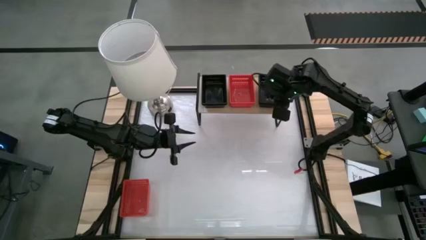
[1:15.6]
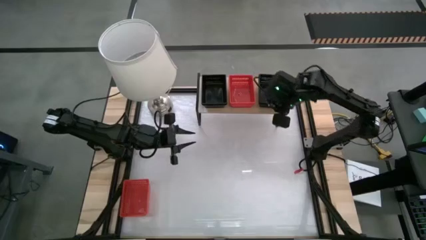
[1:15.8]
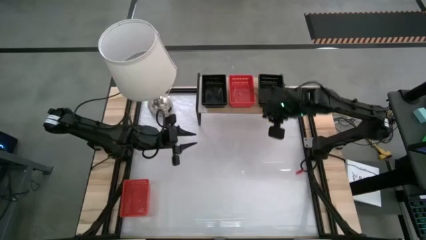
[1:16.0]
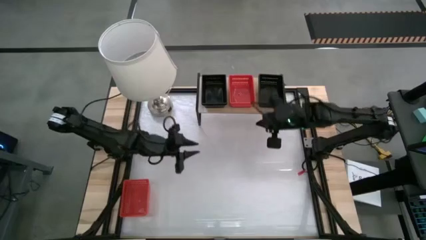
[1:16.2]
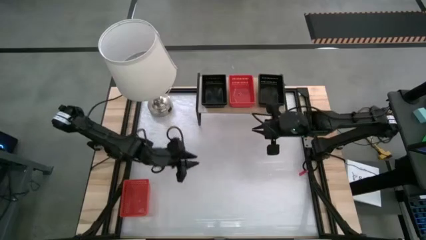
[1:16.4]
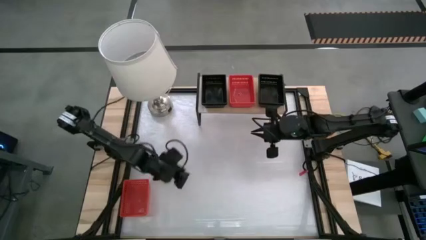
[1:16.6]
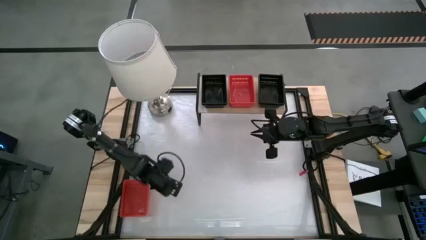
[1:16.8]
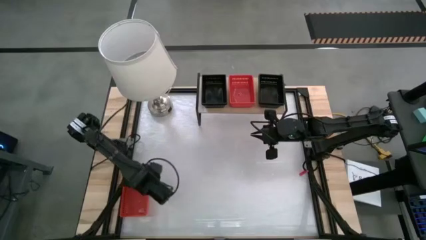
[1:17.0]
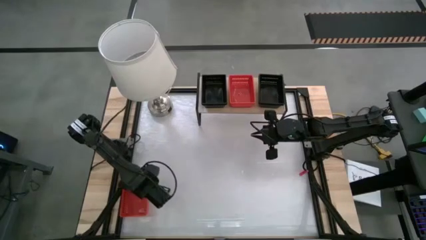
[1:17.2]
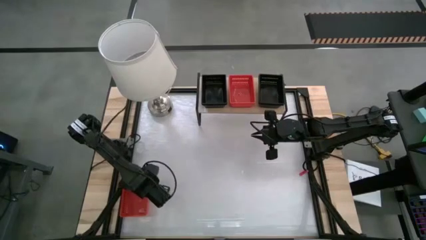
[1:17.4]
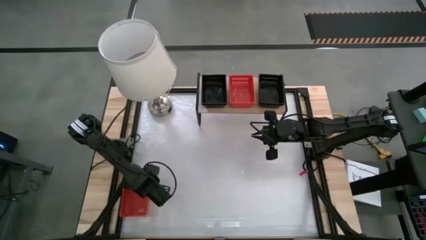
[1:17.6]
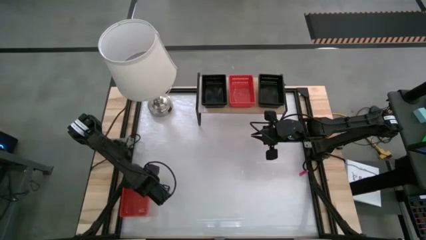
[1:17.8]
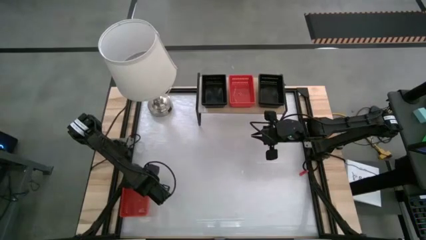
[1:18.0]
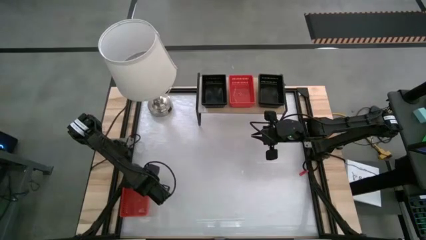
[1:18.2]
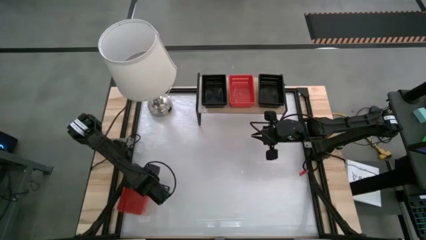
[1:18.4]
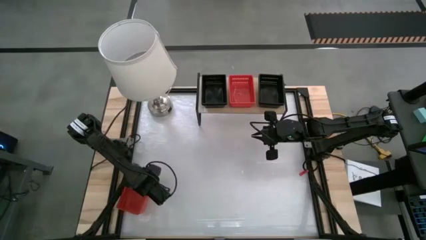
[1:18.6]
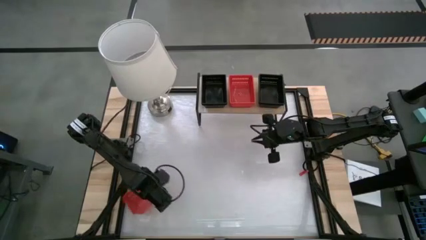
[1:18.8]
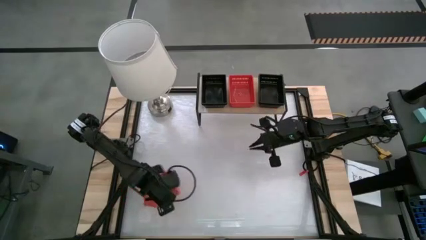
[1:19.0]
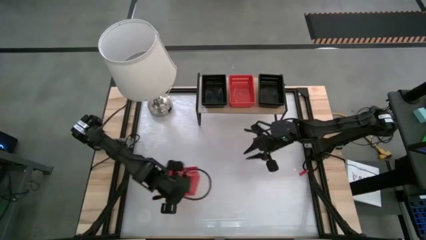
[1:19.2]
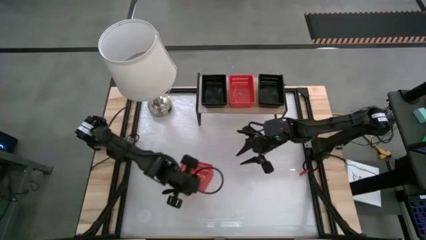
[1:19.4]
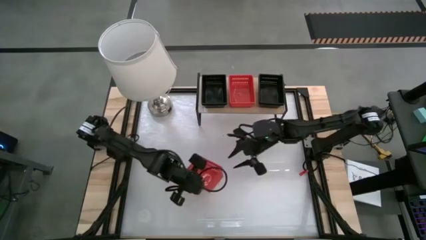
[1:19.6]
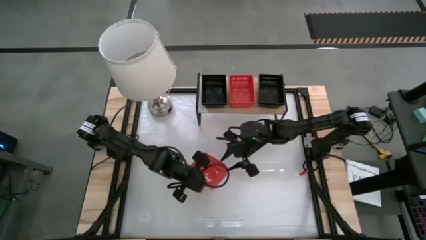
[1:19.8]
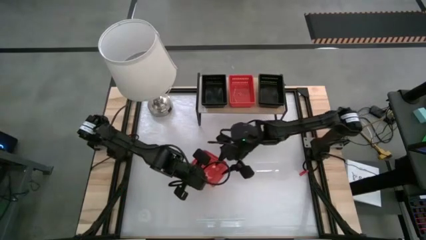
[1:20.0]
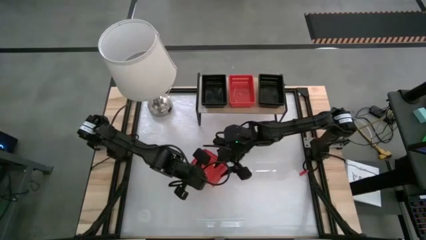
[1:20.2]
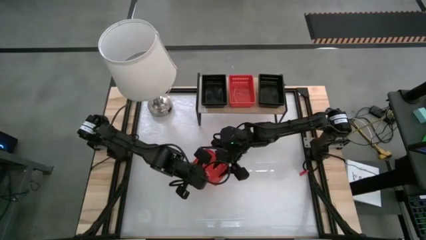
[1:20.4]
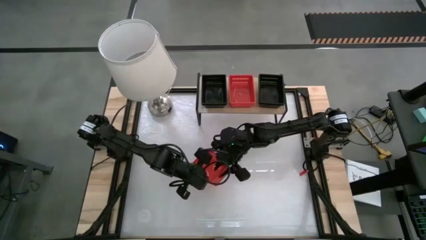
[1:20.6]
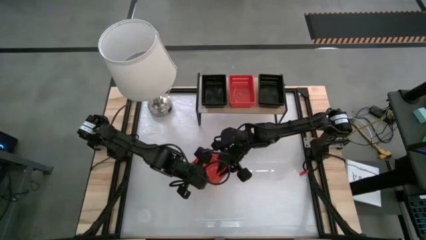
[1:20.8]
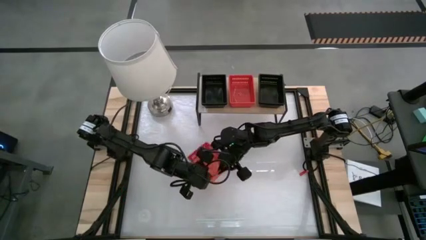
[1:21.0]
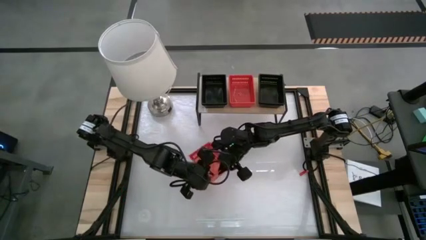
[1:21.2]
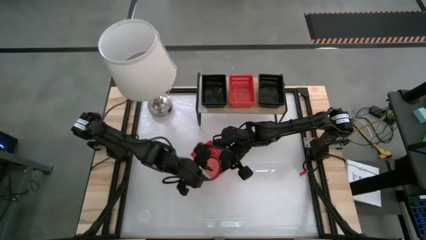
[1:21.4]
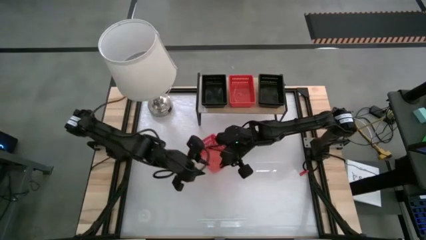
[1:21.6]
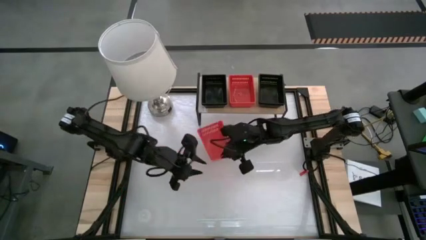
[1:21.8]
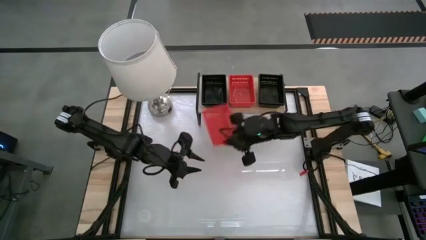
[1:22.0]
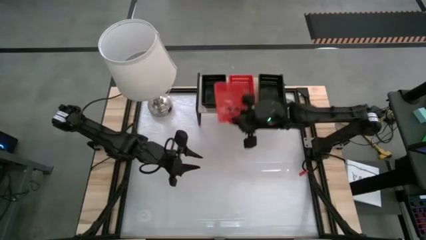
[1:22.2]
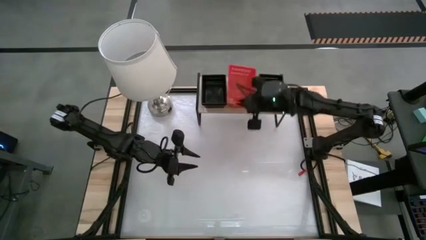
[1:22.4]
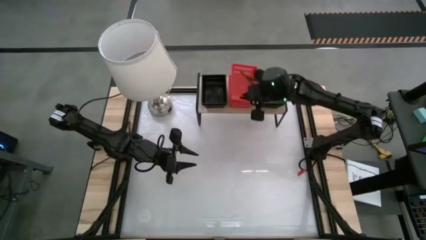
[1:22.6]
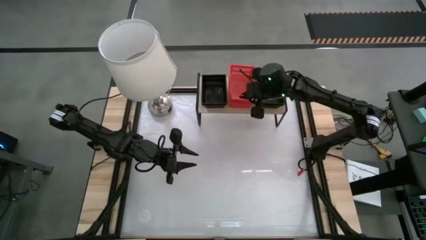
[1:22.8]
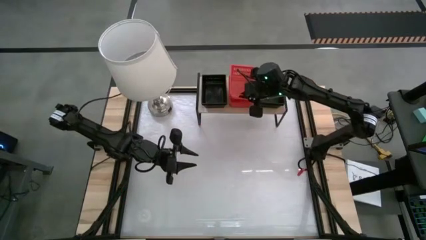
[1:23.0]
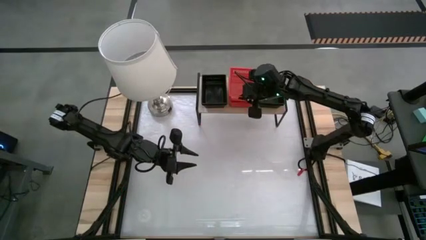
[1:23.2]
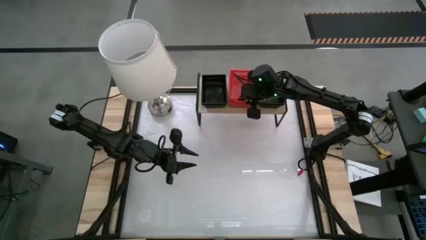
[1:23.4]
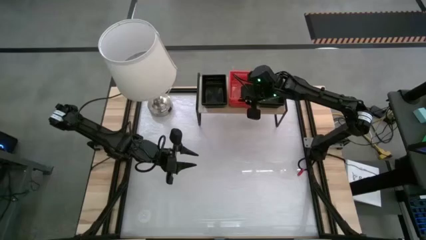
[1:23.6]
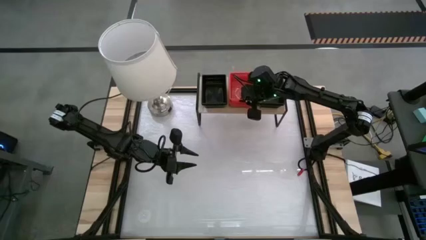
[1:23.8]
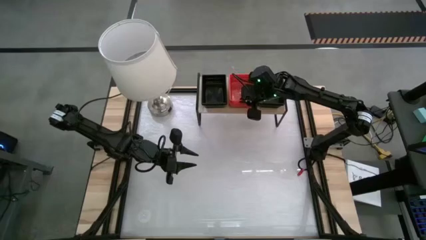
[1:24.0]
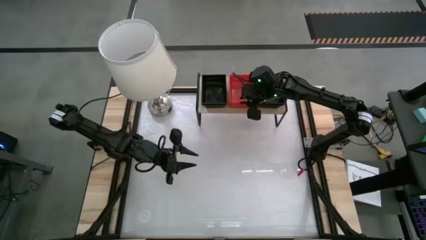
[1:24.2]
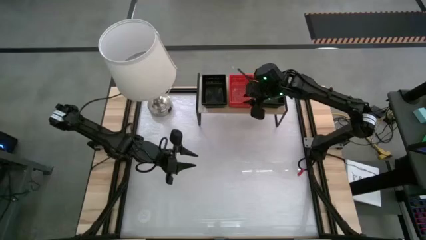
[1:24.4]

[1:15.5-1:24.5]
Task: Stack baskets on shelf by color
Stack the red bin on top of the other red bin on the shelf

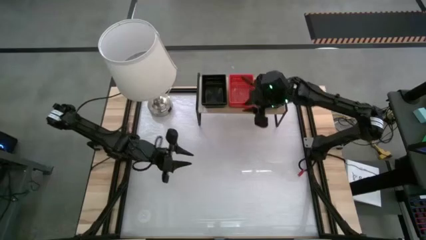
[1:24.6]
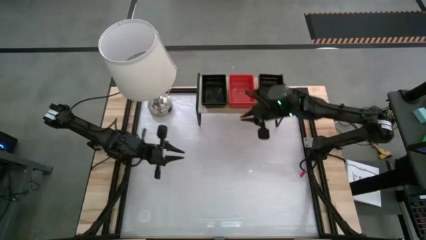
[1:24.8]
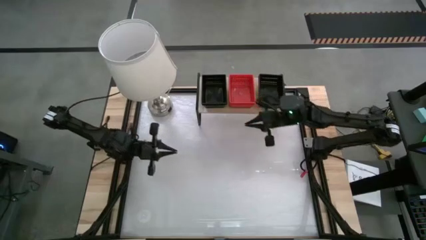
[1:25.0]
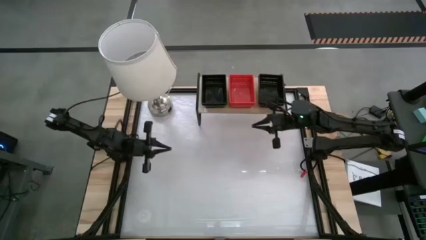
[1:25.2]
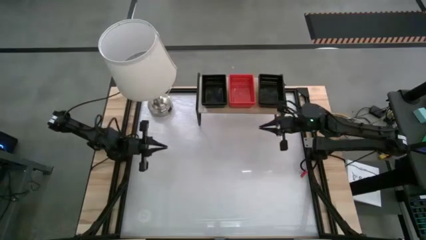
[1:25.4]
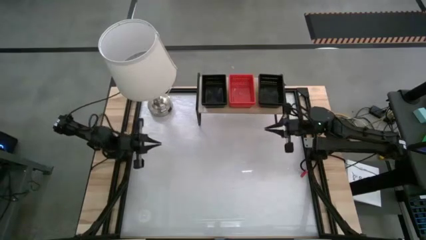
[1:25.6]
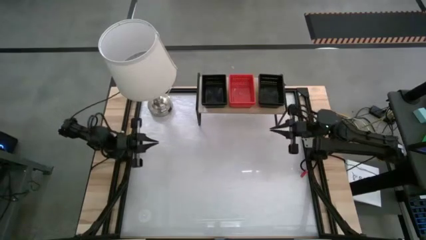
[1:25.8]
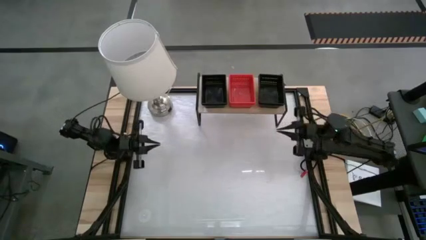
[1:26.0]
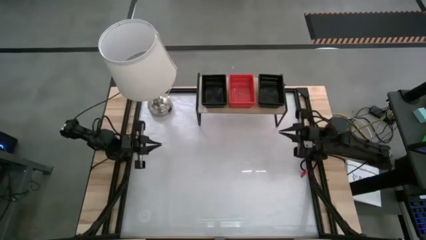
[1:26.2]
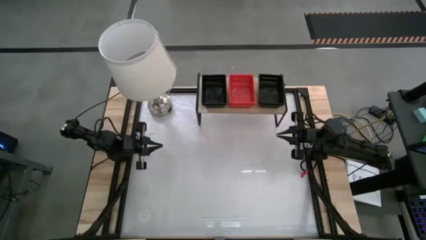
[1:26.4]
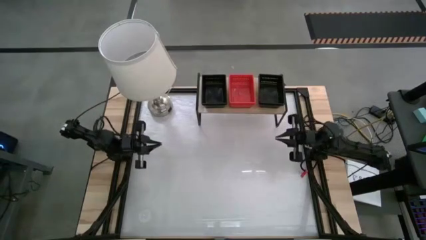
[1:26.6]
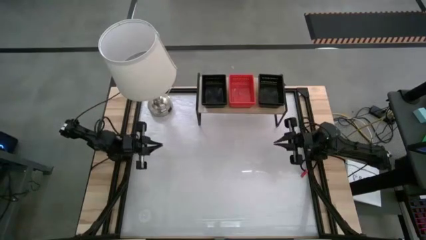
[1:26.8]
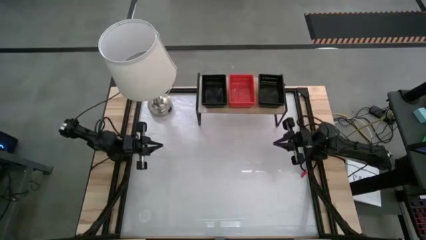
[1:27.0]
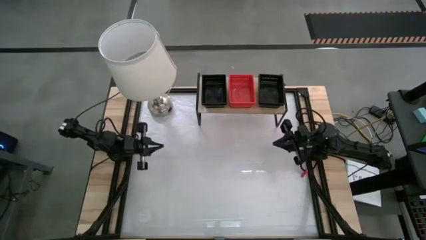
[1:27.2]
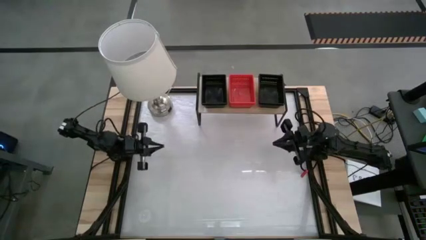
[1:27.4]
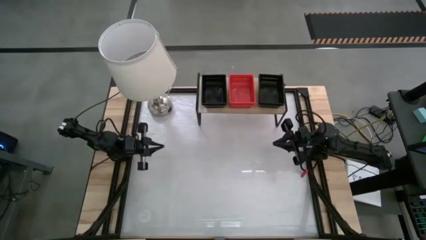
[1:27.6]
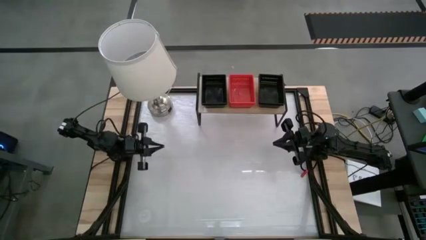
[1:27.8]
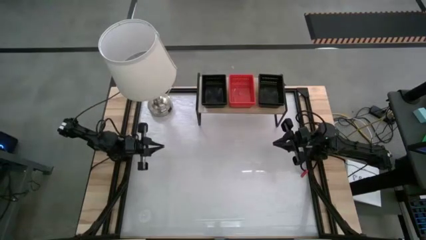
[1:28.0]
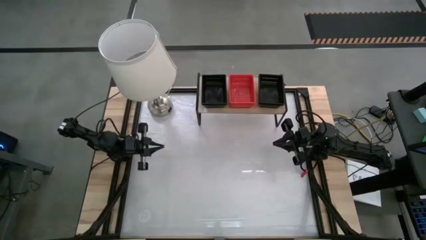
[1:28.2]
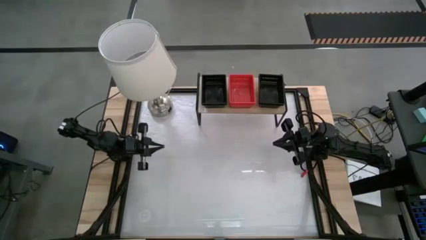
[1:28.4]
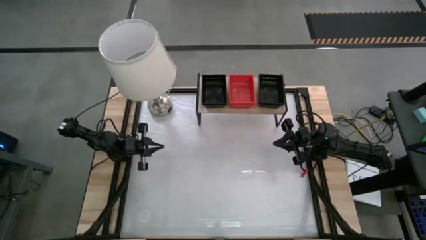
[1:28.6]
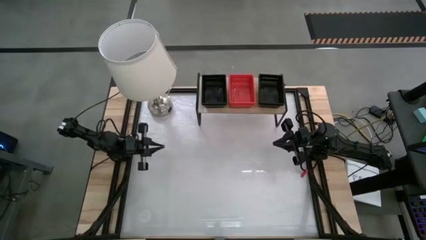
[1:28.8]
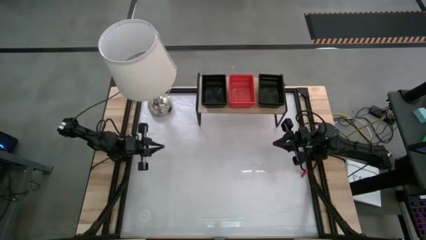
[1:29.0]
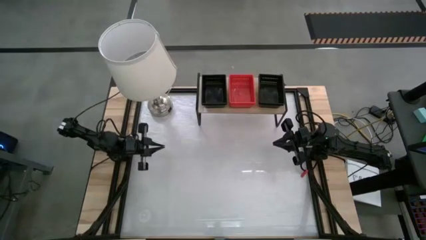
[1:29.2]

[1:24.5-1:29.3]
Return to Home Position

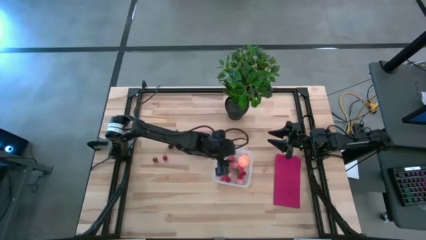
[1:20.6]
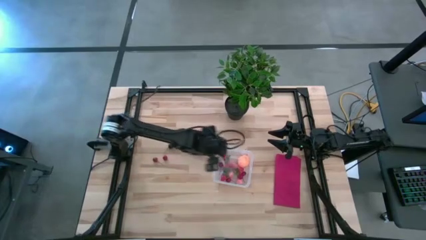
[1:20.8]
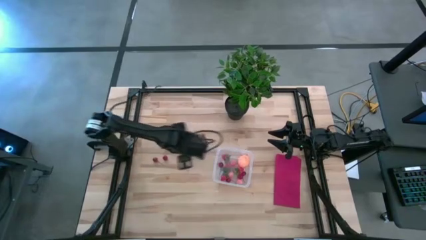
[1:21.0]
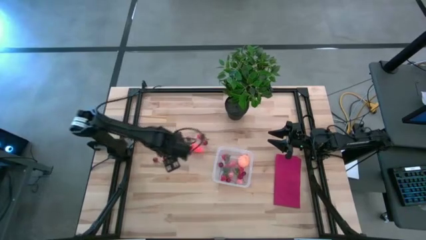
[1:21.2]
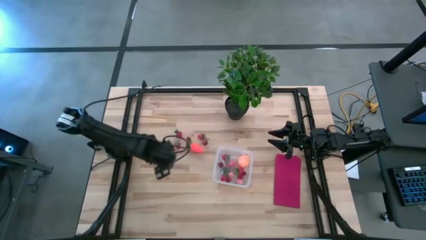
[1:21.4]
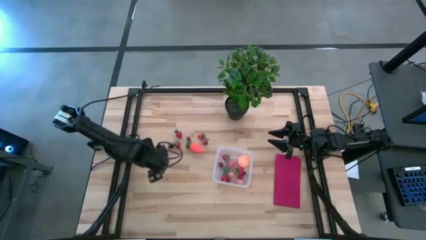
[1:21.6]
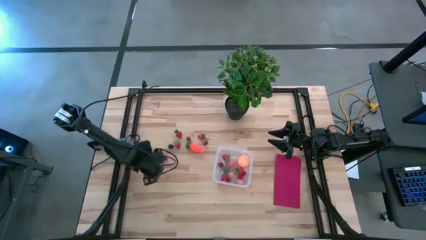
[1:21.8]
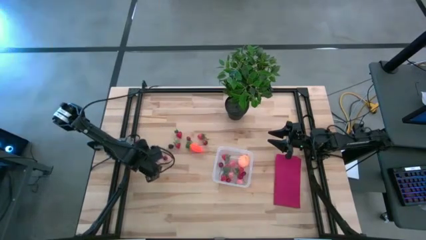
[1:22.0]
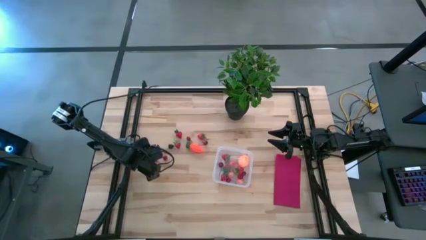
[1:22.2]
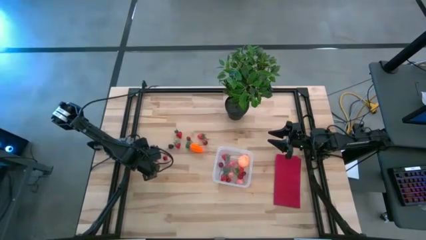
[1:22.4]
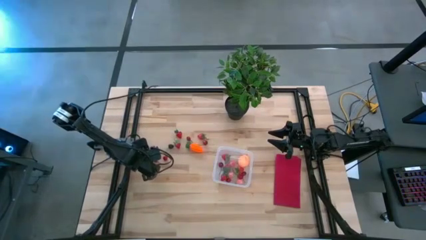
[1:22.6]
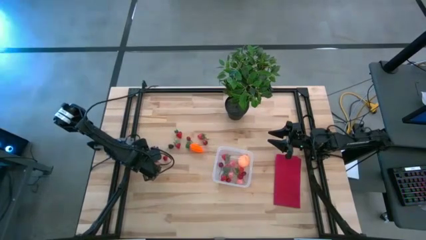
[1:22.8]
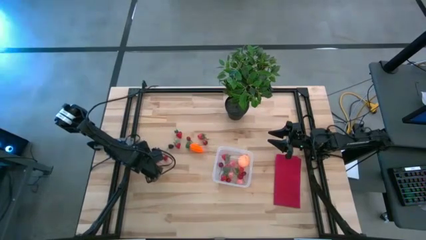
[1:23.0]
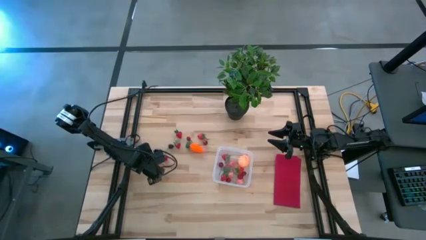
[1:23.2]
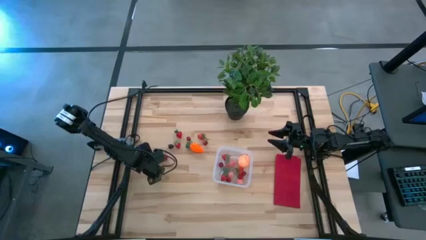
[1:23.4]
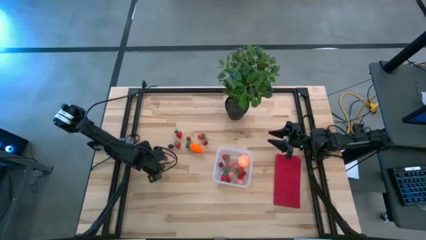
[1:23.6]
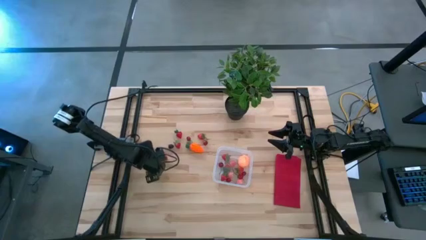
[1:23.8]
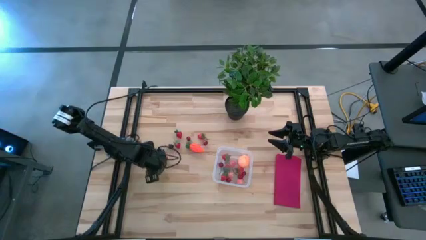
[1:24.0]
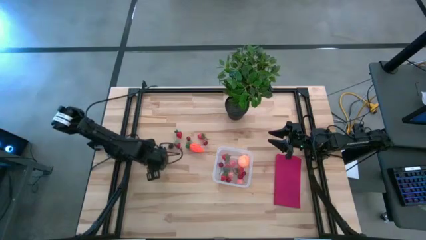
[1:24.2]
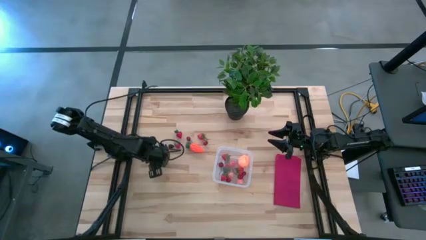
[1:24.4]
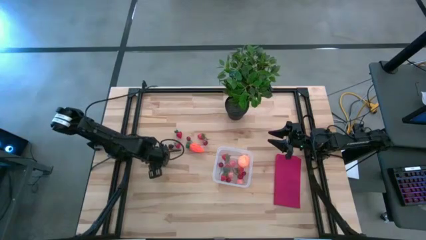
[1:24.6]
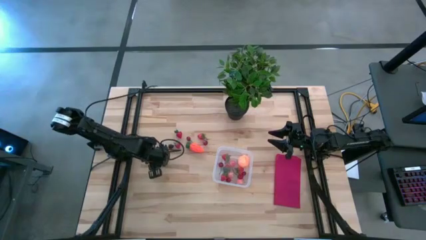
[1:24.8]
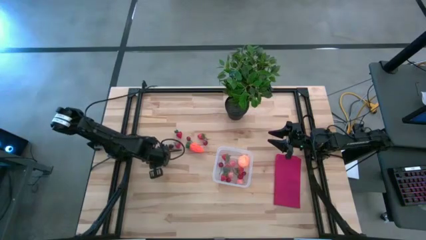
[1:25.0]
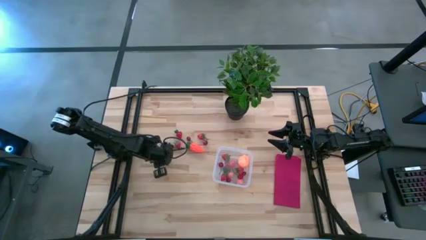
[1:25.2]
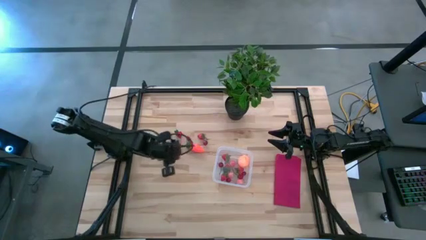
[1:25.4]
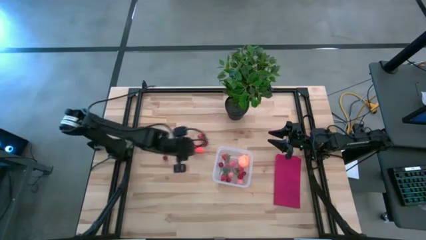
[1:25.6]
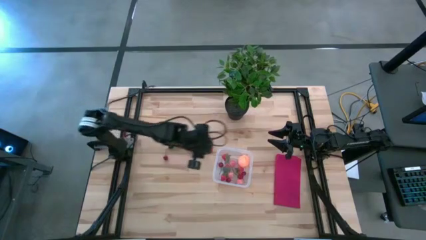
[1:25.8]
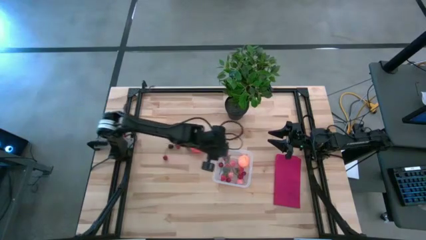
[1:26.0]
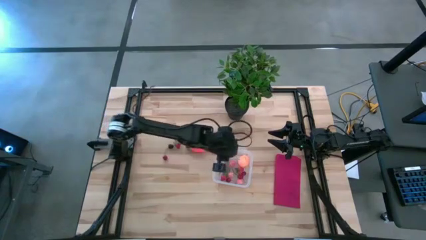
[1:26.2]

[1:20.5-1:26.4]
Task: Pick and placing Produce into tupperware
Put the red cherry into the transparent bin
